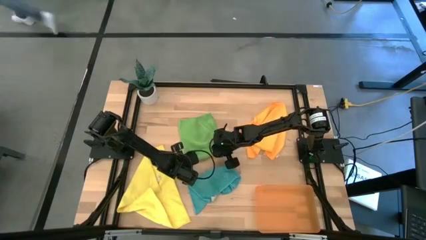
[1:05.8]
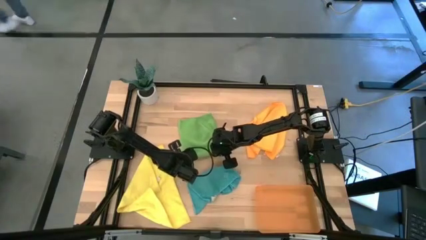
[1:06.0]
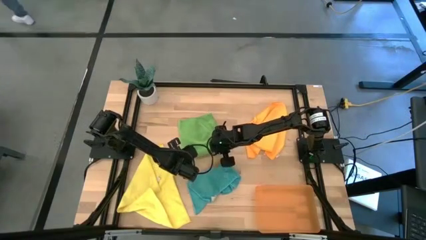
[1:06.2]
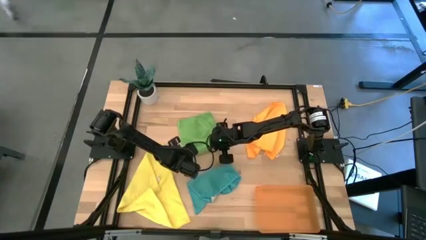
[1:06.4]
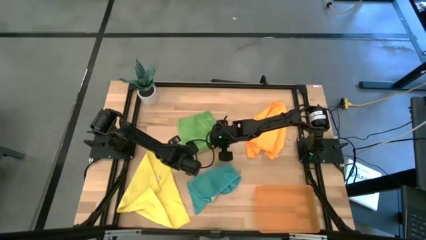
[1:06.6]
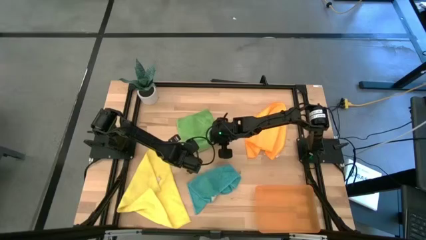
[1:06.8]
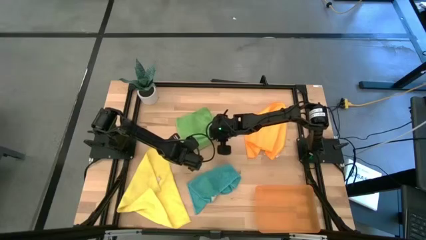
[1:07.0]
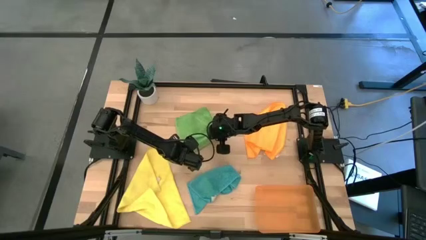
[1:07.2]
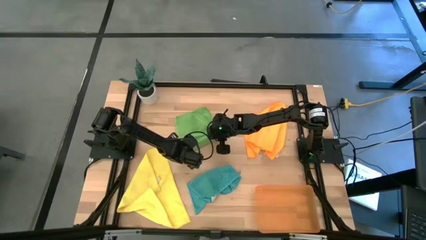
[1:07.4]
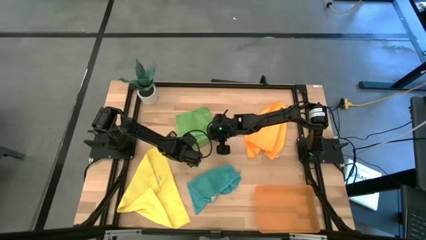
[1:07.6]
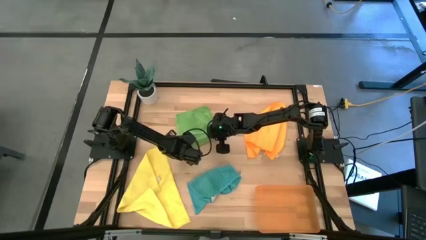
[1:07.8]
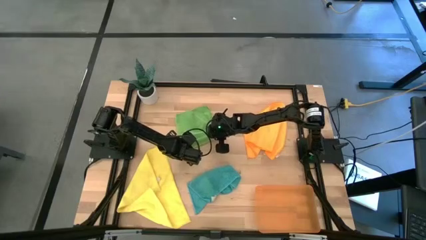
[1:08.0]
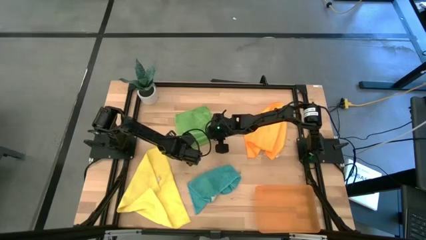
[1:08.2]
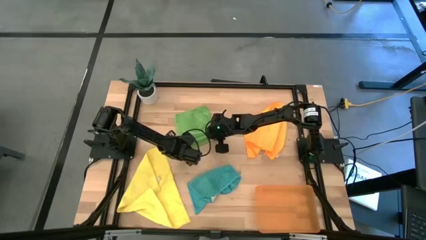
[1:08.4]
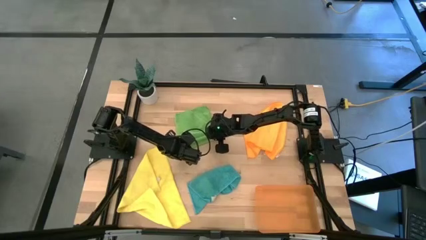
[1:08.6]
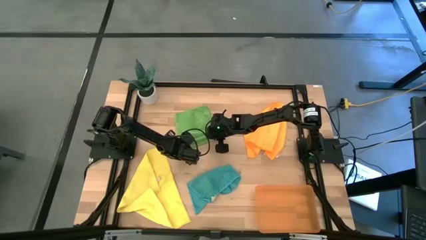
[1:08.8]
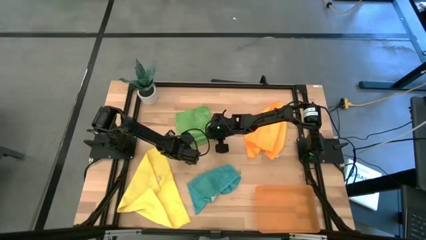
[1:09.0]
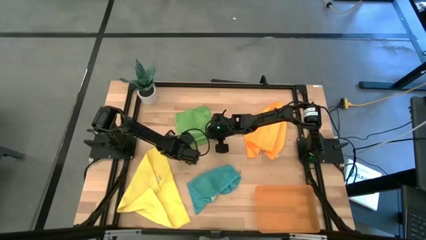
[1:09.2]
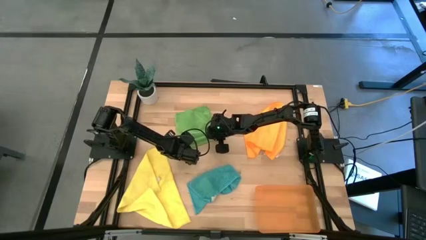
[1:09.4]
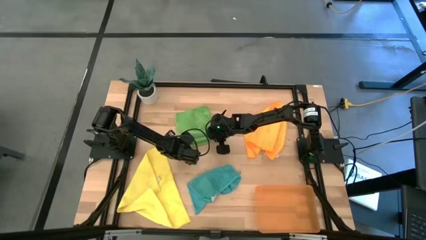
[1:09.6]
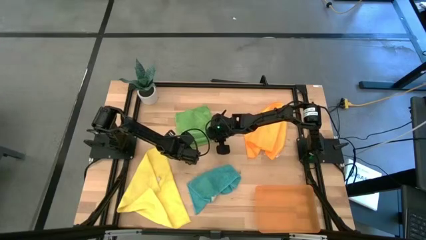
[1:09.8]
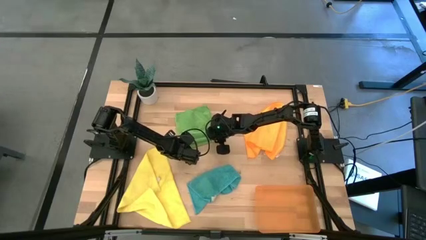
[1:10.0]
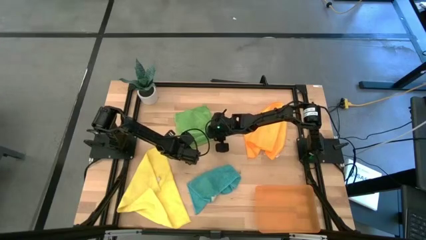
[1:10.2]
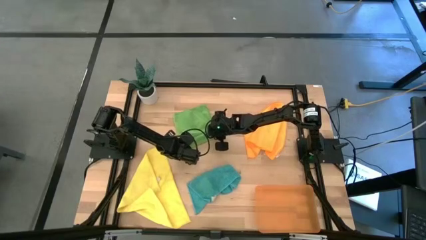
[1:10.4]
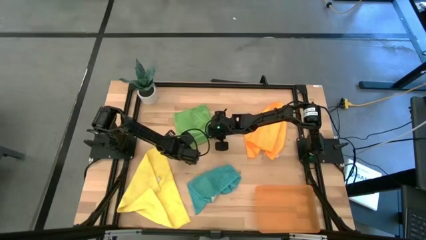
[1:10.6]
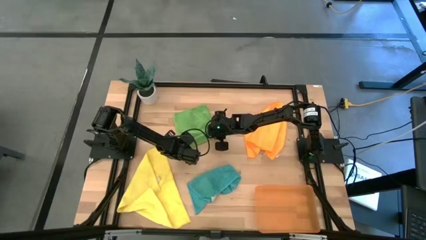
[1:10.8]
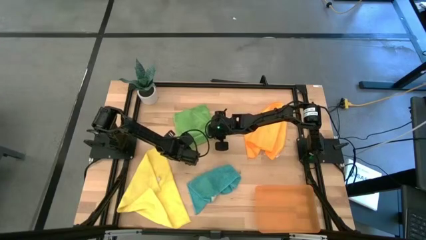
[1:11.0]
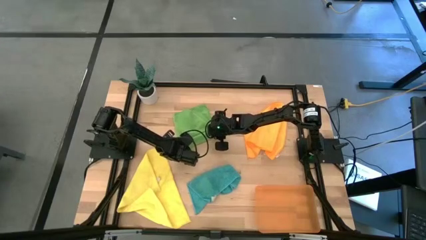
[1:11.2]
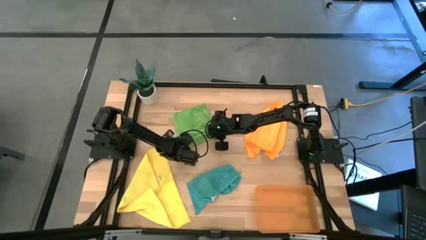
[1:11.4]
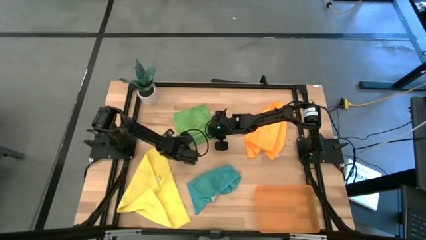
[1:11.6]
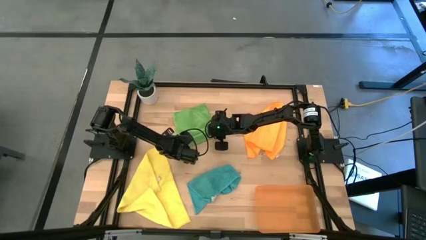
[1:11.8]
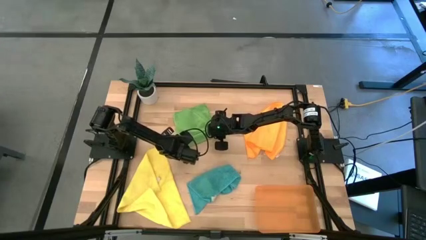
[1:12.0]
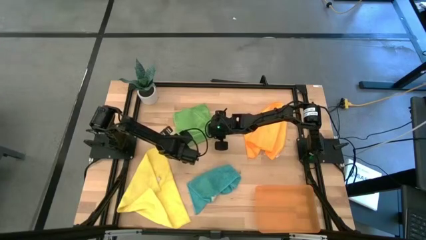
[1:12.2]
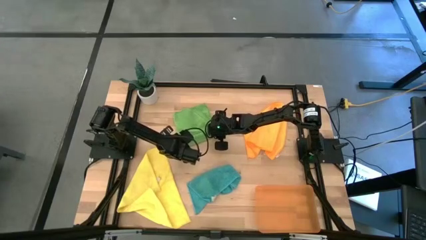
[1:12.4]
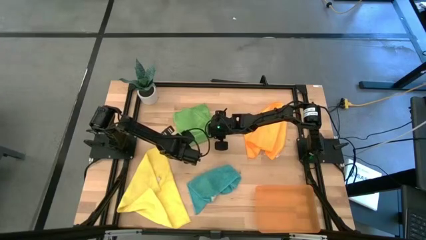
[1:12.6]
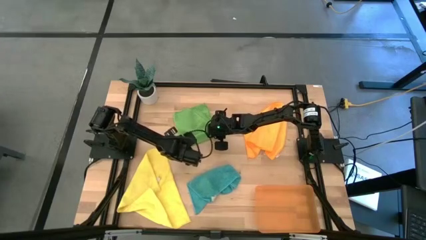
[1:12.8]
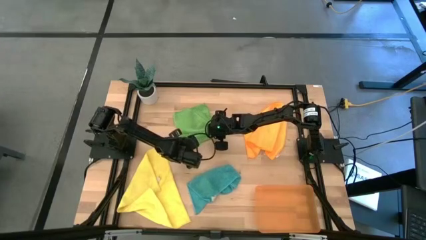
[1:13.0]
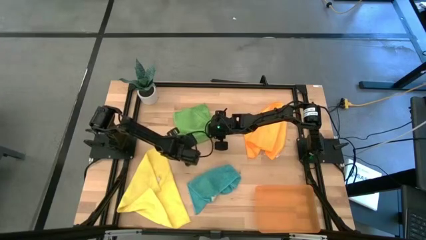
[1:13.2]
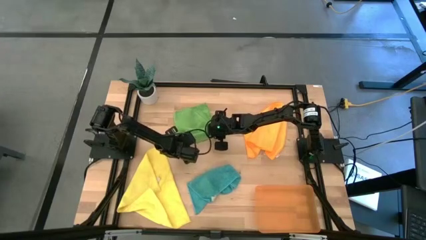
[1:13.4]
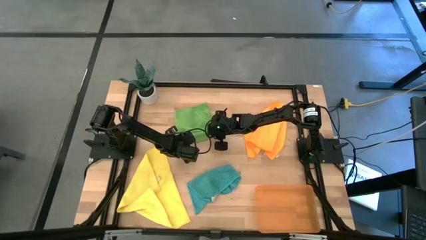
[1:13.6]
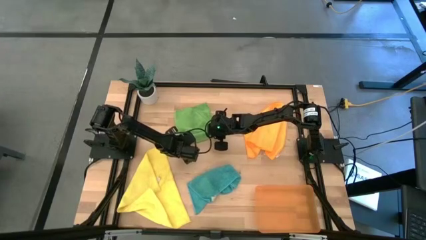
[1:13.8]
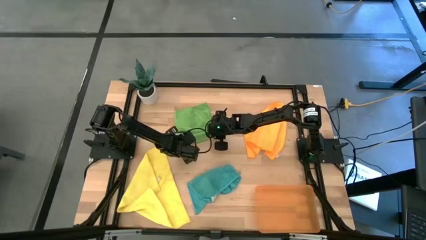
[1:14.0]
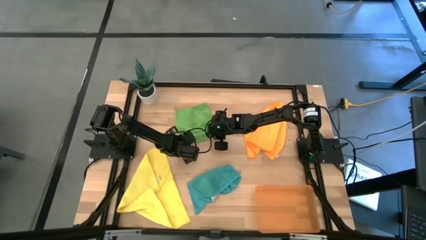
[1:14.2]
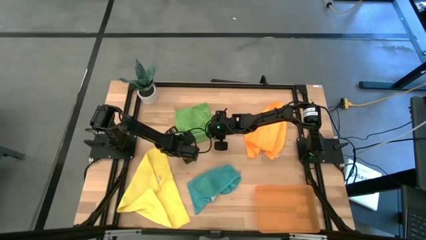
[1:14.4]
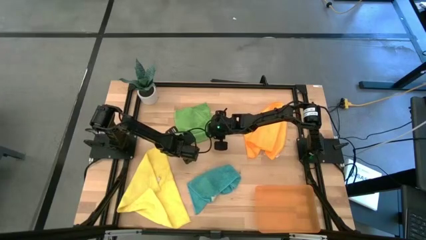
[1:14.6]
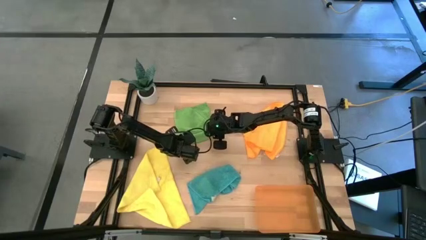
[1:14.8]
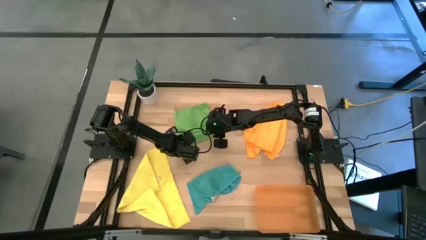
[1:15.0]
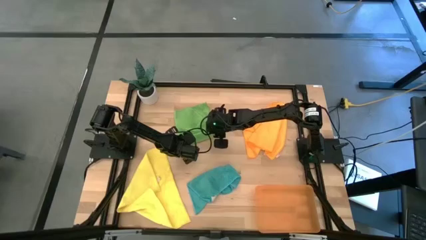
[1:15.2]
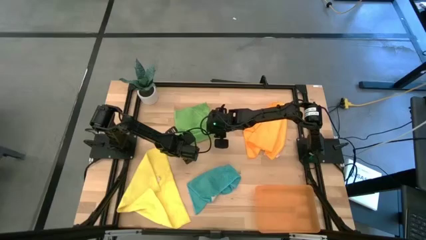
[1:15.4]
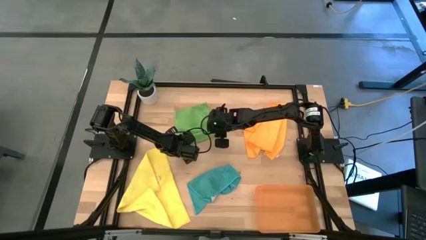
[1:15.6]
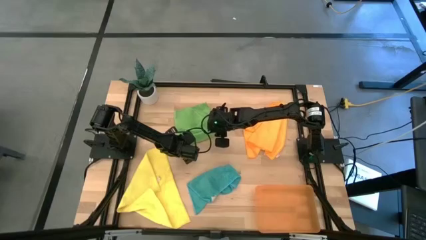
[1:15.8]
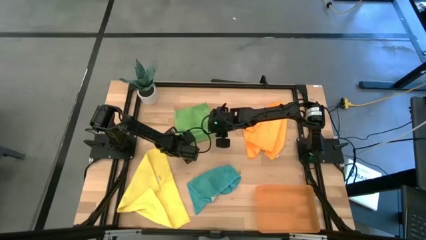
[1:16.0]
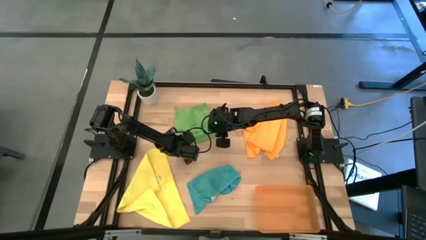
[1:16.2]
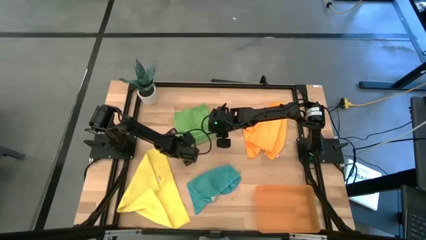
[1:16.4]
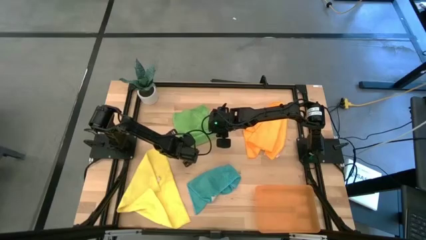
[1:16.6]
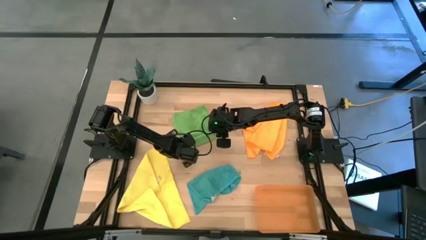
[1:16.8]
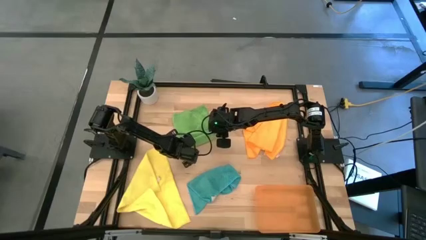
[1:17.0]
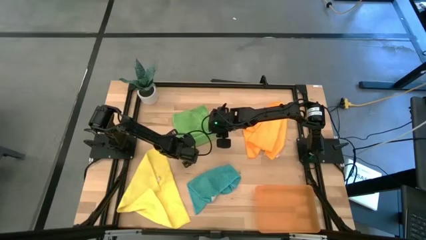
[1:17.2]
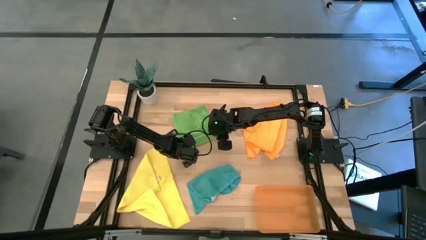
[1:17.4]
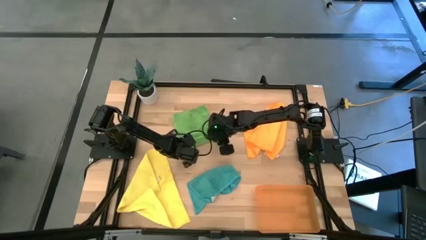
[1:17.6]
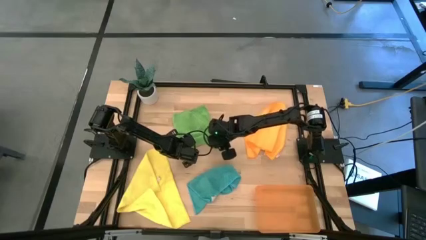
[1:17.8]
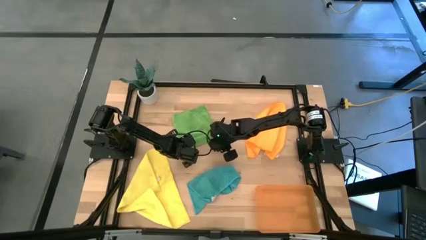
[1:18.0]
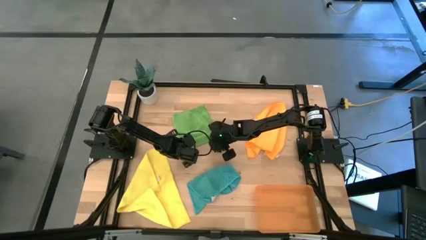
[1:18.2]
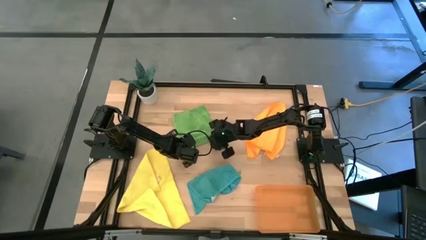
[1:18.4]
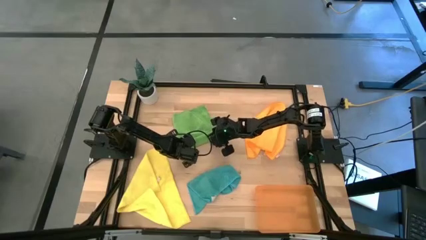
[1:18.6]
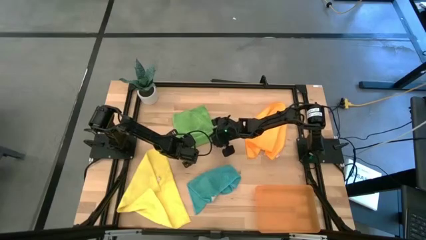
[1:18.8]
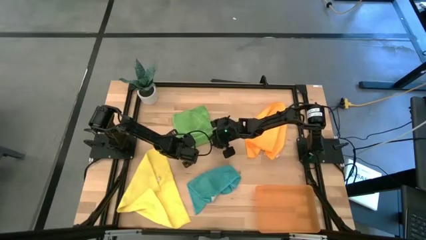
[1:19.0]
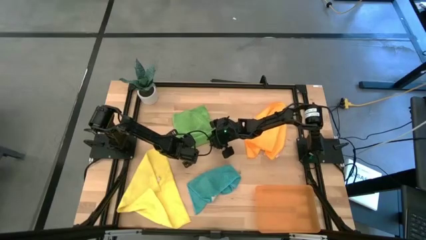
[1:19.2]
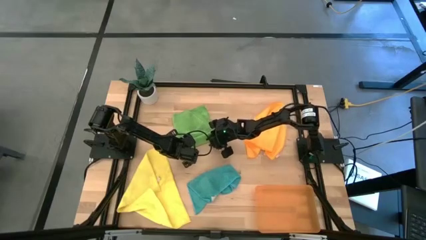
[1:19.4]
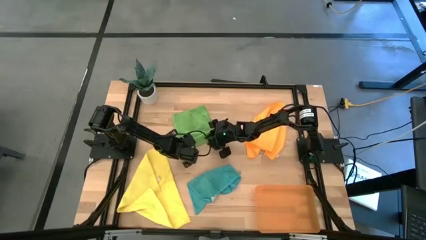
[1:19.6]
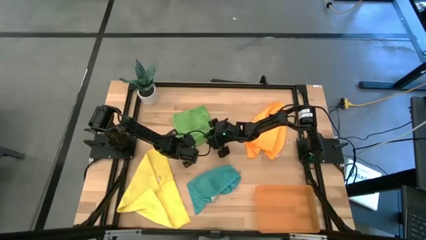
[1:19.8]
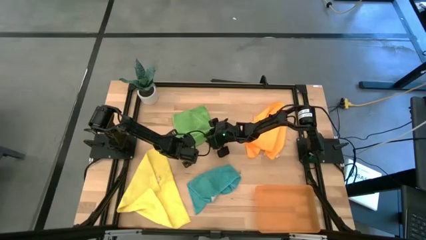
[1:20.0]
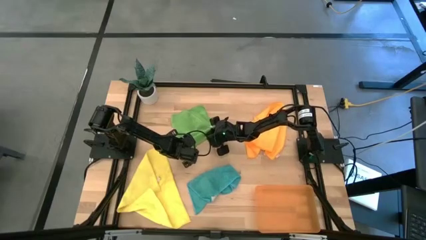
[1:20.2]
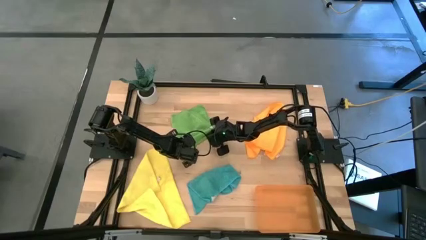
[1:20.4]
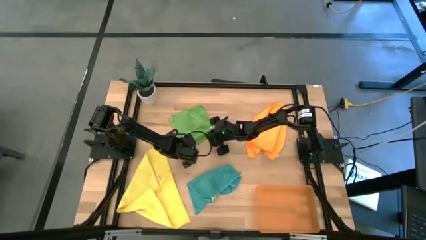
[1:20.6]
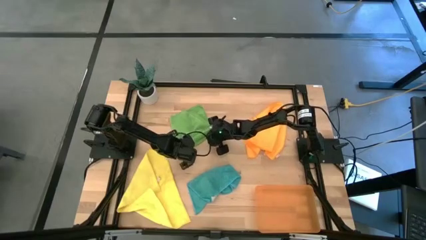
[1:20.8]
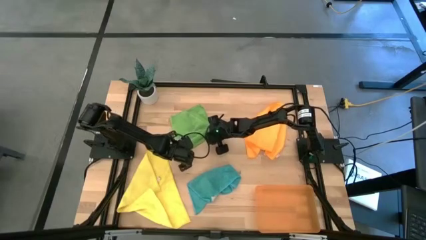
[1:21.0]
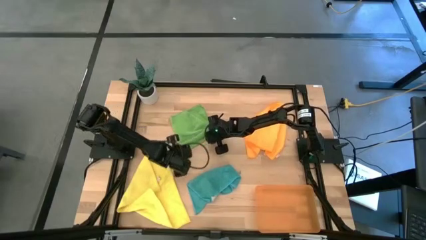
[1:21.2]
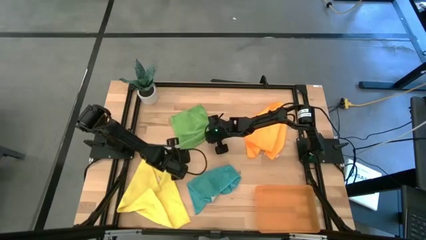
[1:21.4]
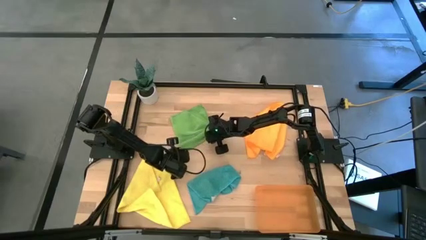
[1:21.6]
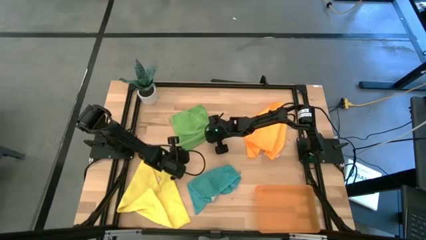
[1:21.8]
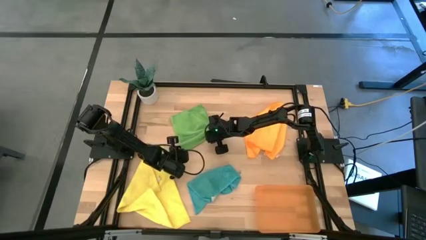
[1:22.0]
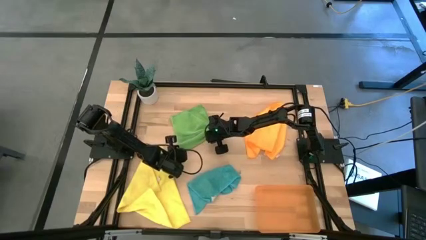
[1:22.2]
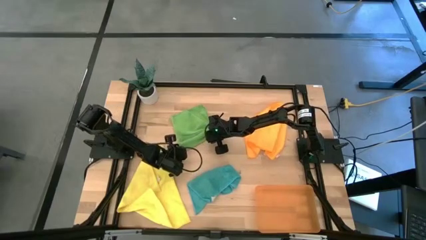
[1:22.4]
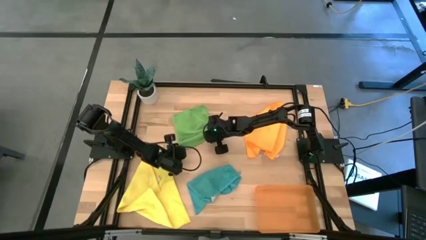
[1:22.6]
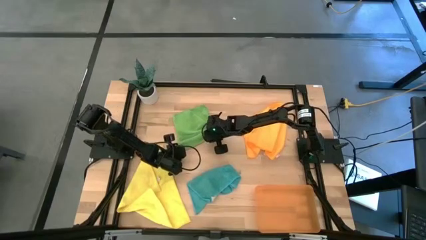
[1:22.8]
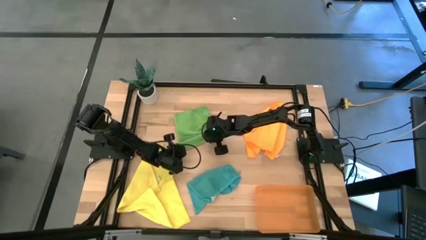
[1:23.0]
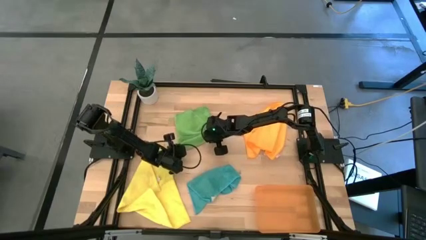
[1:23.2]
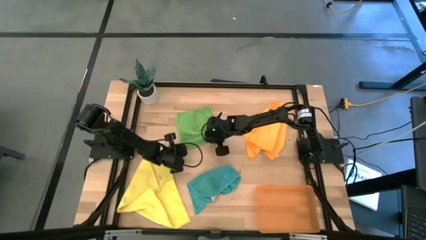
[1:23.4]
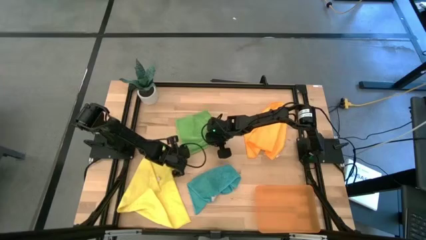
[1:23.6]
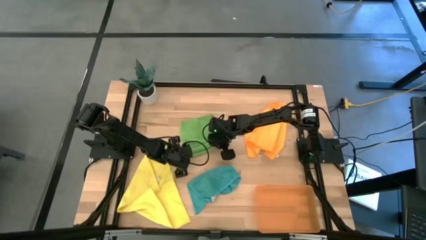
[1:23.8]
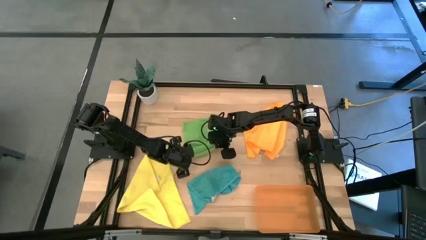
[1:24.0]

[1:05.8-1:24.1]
Task: Roll microfiber towels into tight, uniform cylinder then place into a basket
Roll the green microfiber towel
